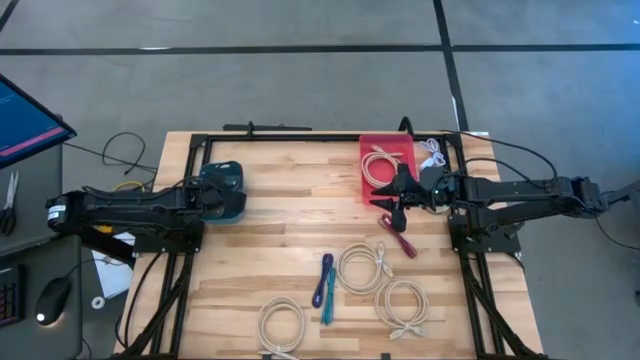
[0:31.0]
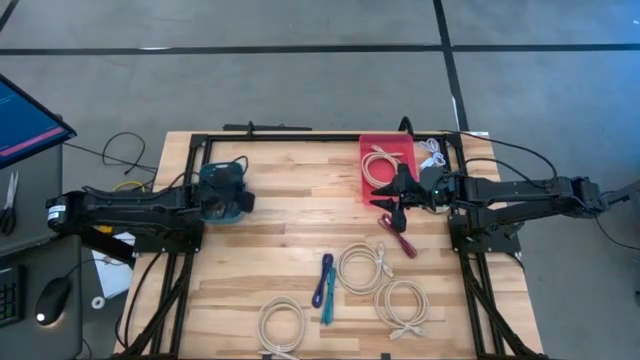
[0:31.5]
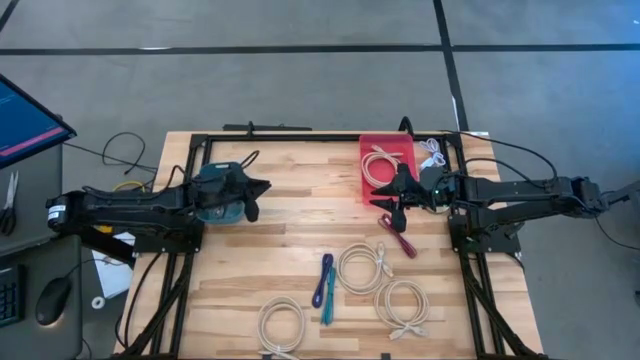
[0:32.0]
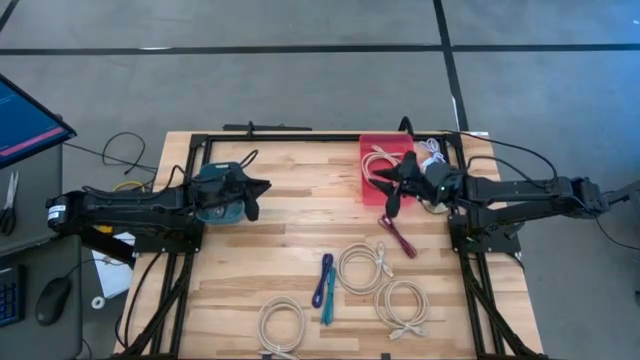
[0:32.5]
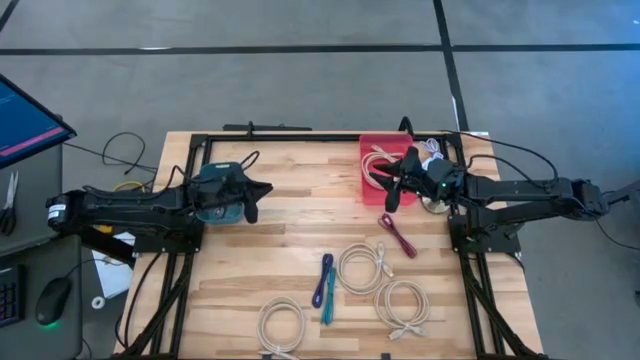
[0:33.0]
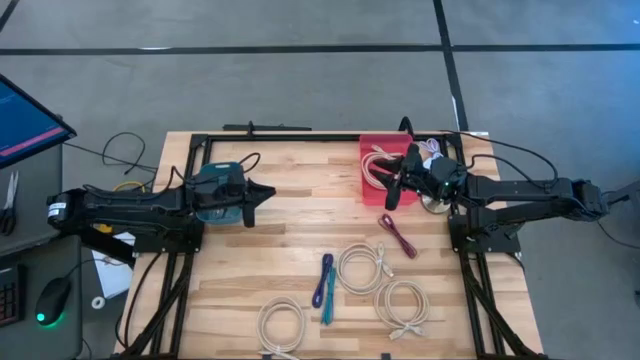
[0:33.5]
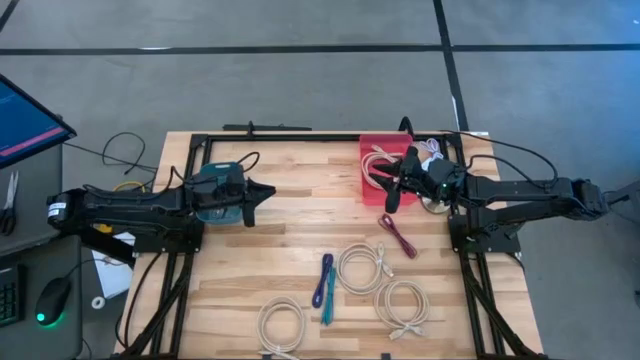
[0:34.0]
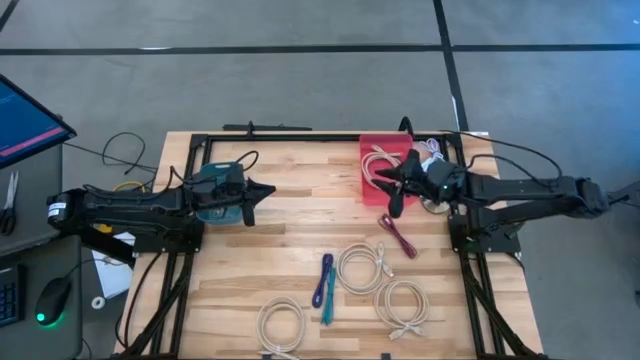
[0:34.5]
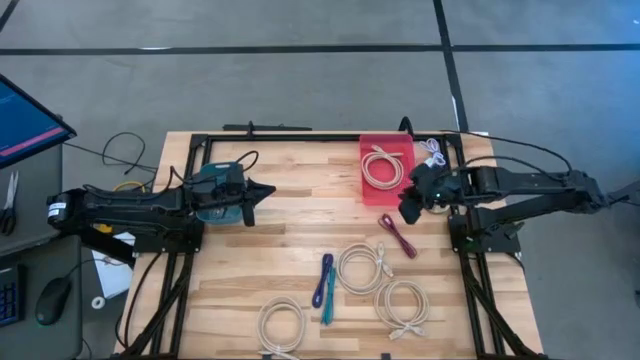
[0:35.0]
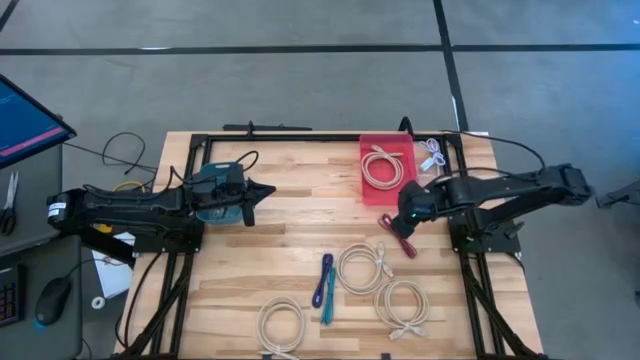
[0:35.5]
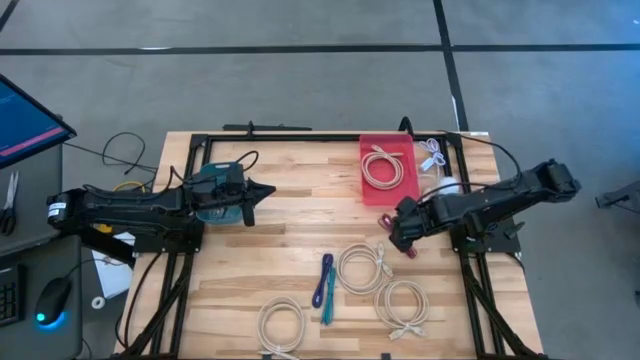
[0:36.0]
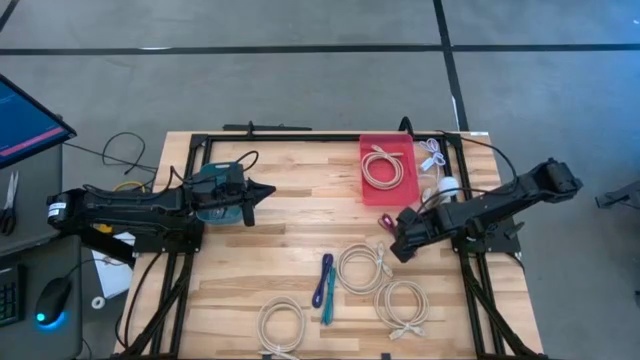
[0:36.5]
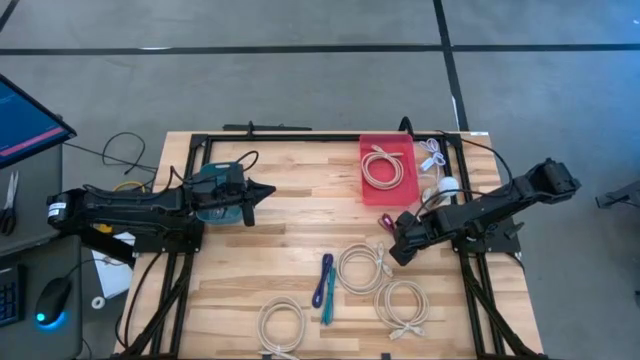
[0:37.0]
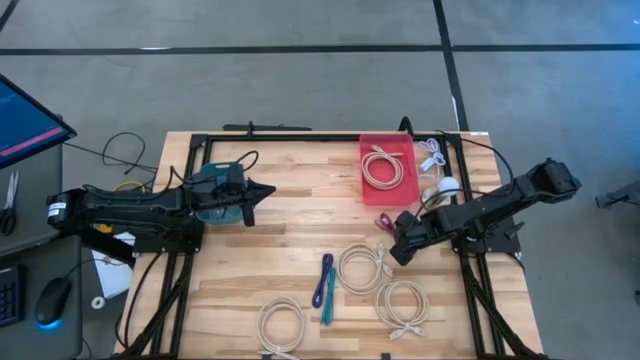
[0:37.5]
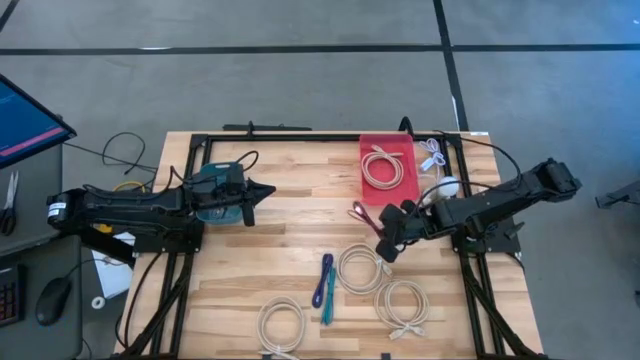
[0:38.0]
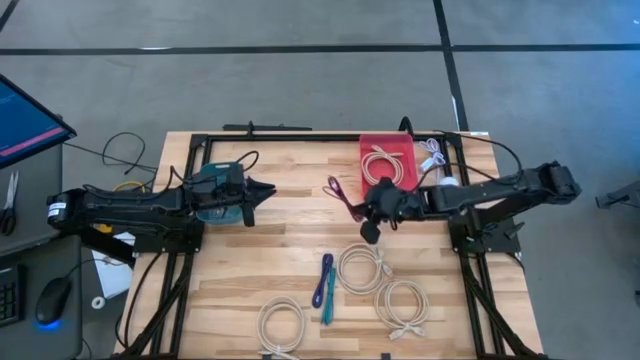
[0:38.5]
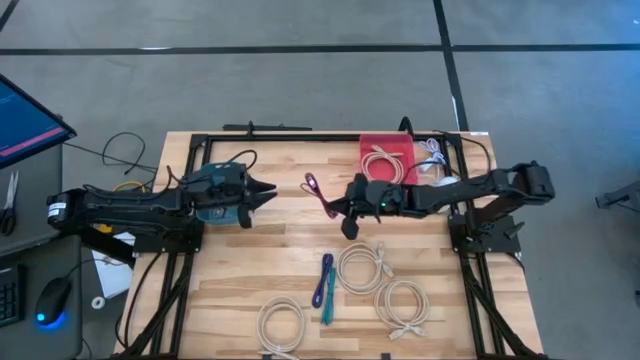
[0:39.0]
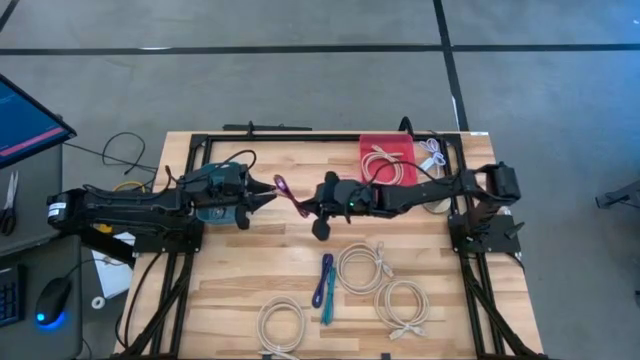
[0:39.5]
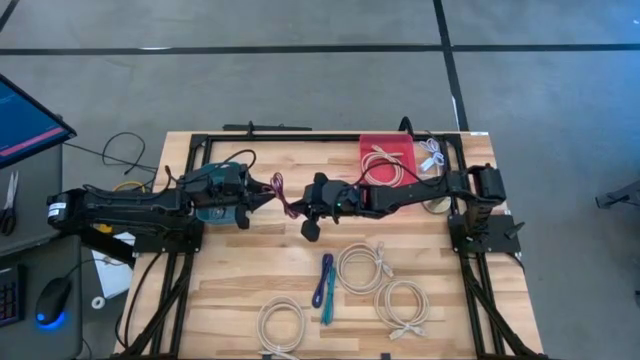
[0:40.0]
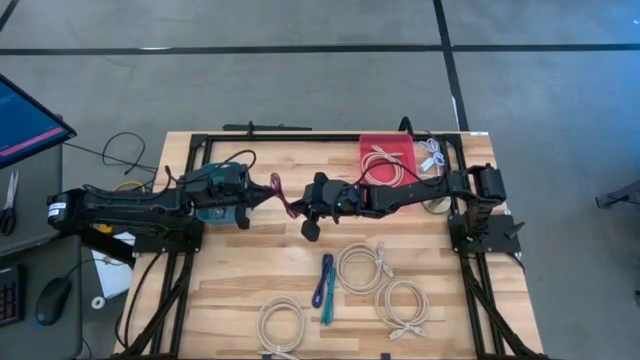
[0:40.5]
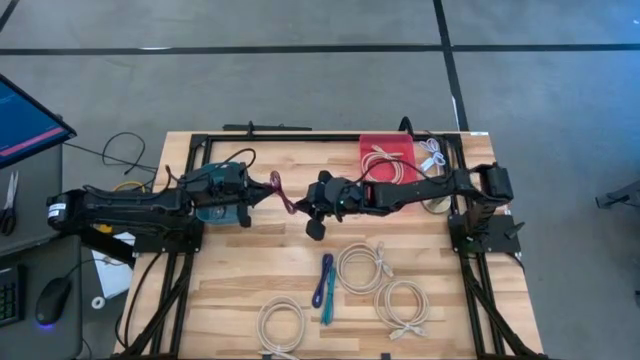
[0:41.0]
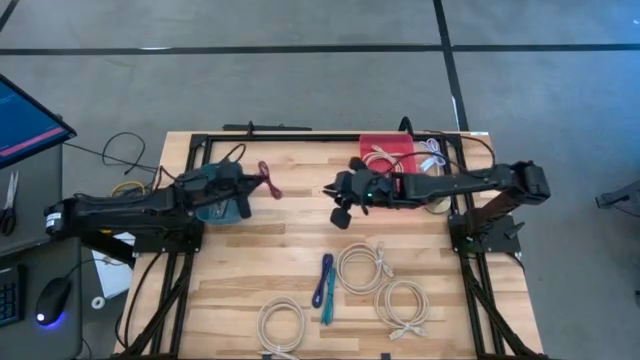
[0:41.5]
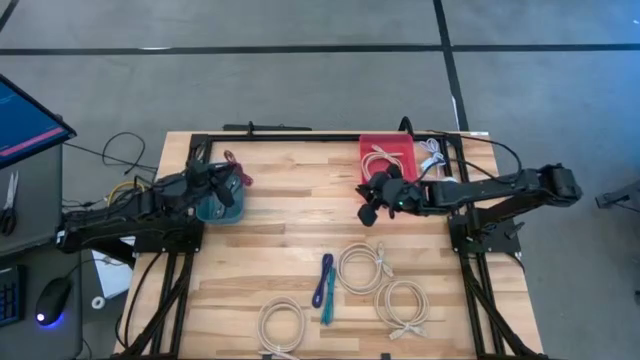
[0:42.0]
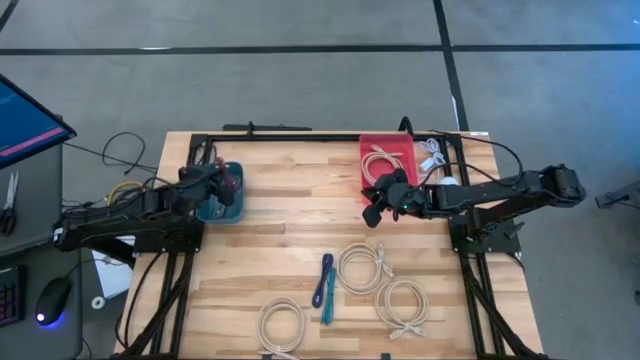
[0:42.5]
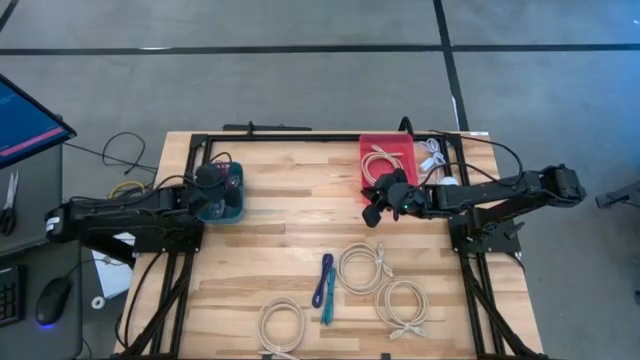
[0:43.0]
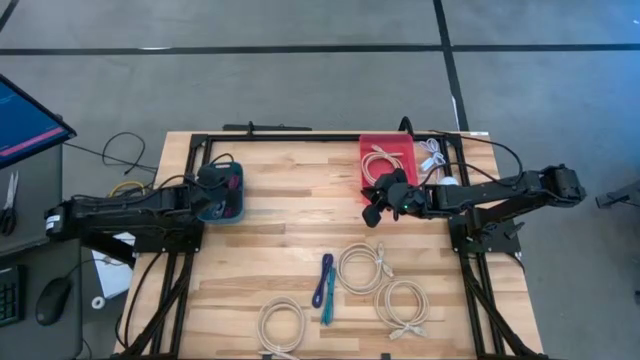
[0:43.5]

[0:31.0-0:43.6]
Task: Pick & Place USB Port
Put the pink charger cable in the blue bin

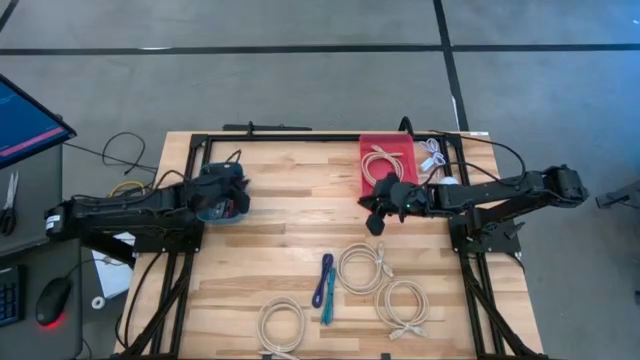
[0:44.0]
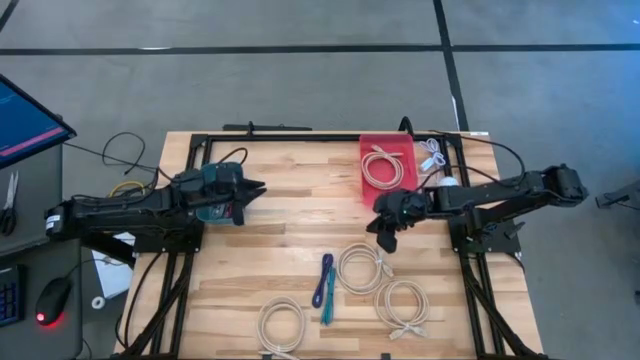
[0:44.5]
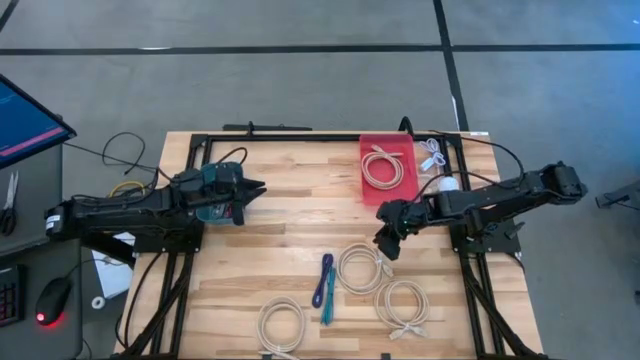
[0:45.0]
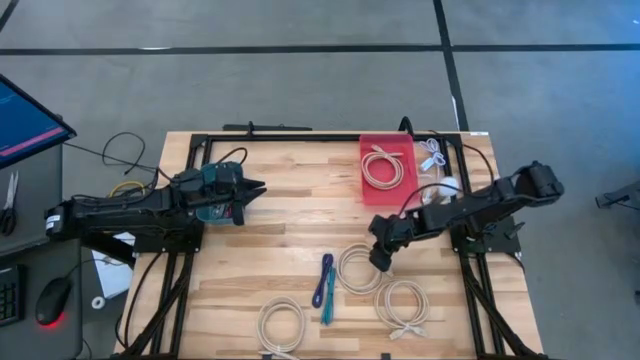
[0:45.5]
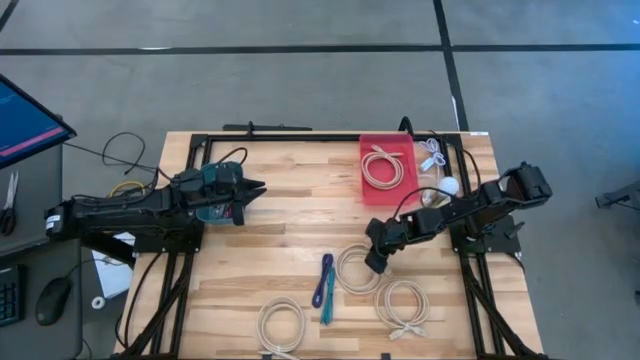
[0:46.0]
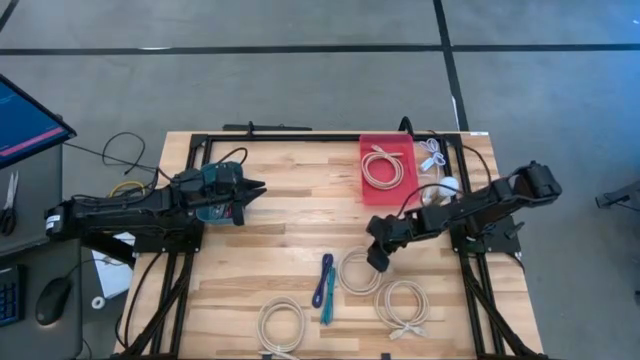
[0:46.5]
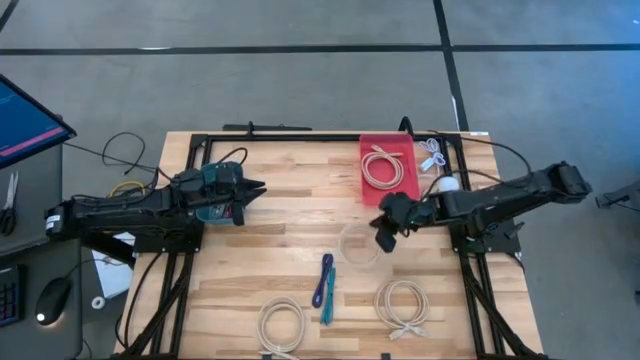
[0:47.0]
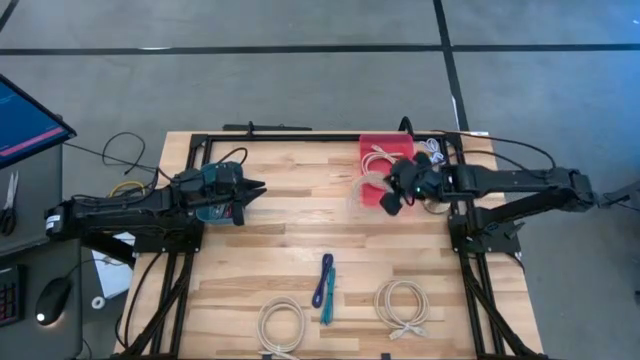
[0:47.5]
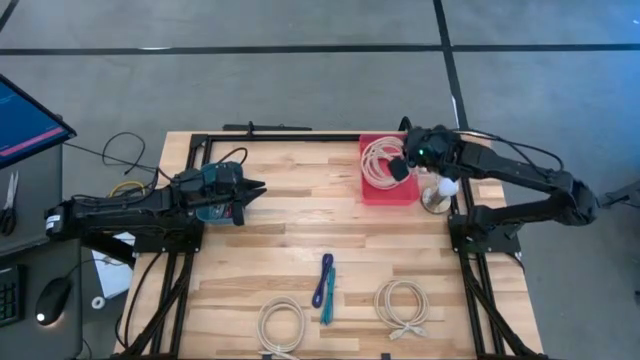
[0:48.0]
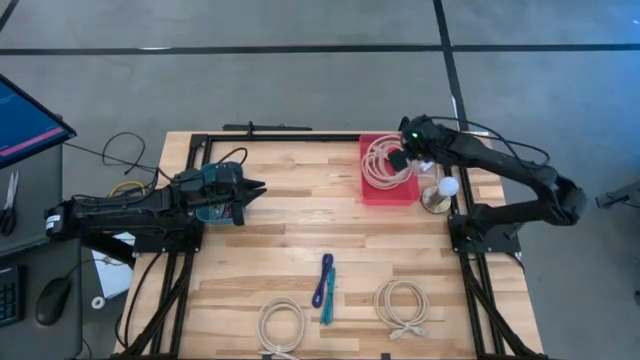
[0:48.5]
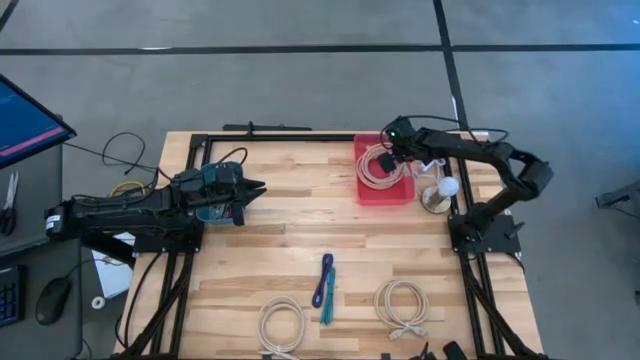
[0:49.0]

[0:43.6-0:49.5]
Put the brown display cable in the pink bin

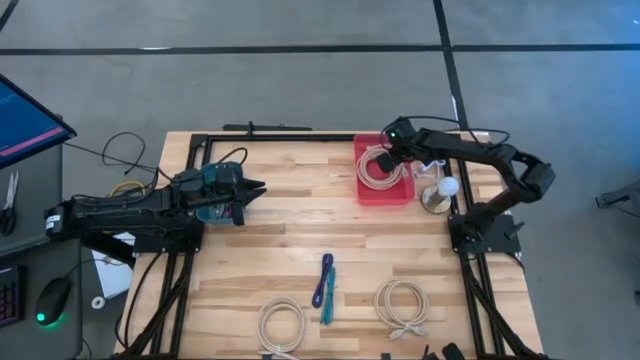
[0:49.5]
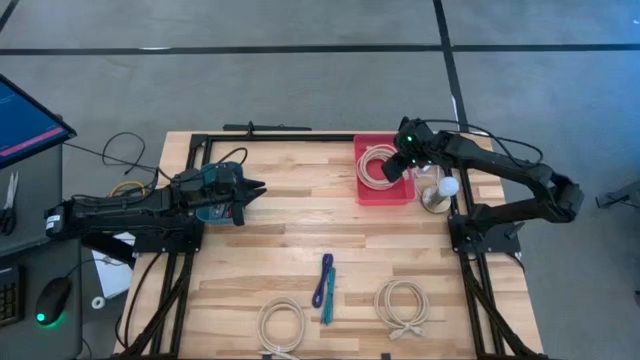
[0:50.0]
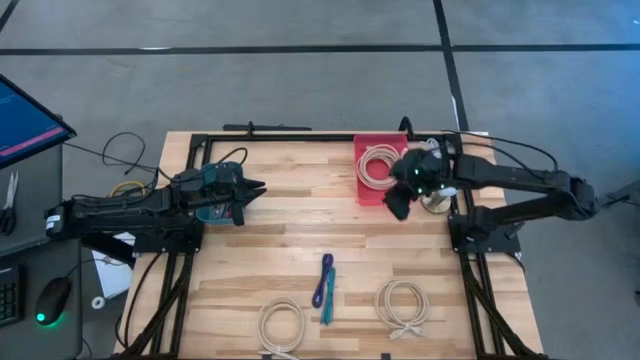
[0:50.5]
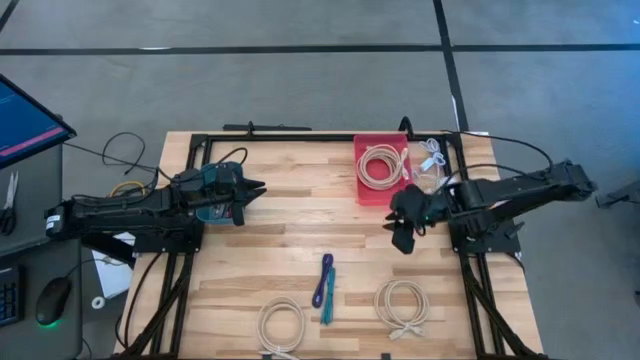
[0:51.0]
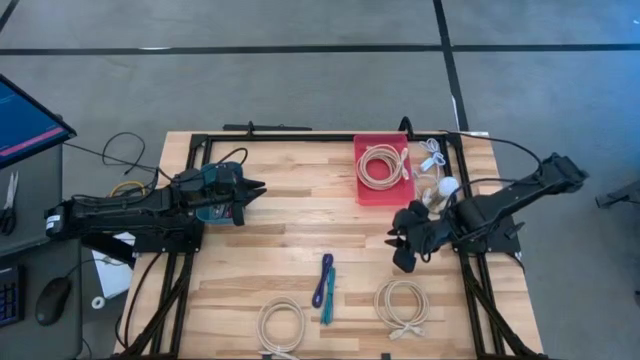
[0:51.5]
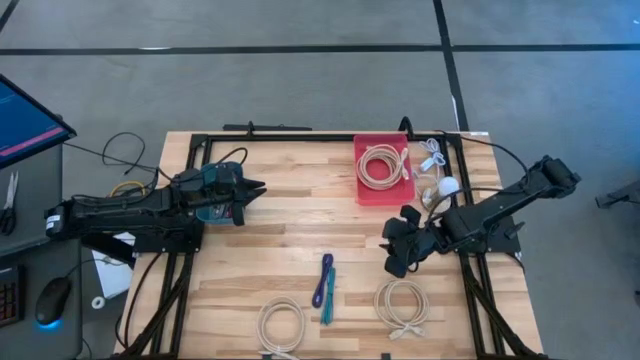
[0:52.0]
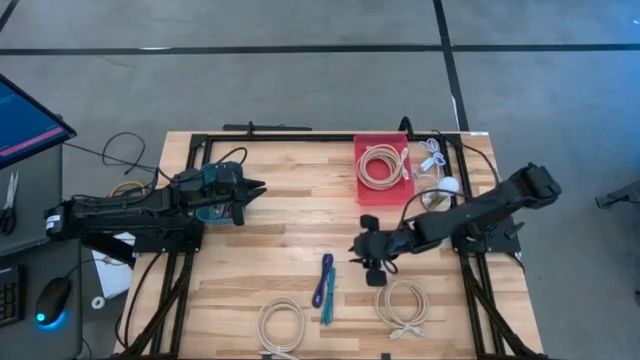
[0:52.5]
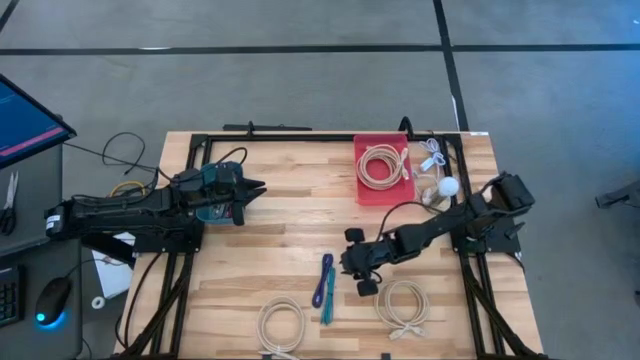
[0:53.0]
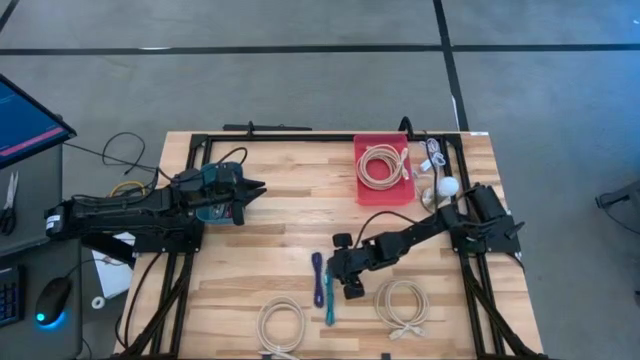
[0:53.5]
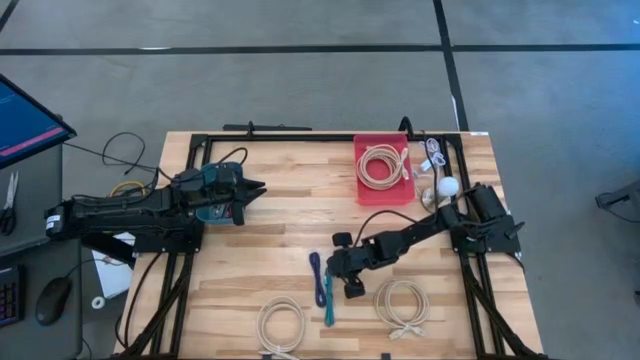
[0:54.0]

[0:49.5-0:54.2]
Put the blue charger cable in the blue bin
